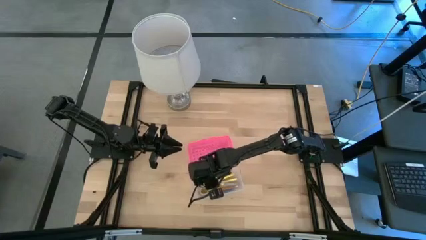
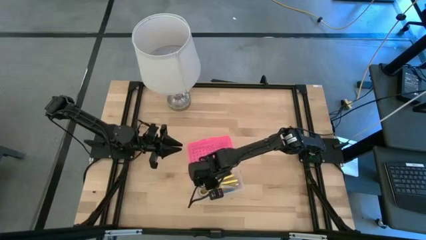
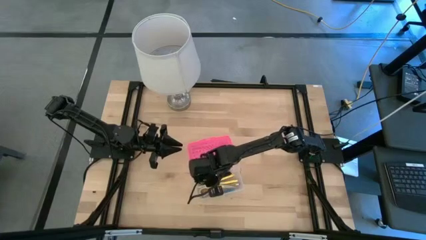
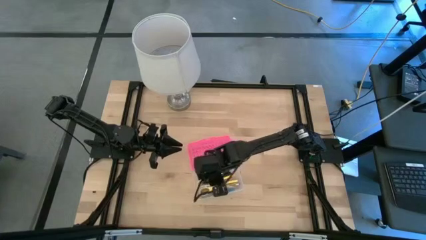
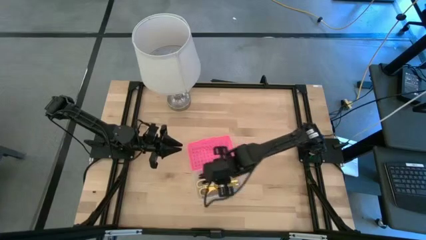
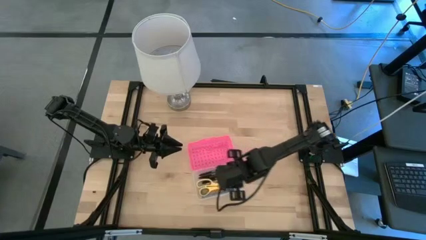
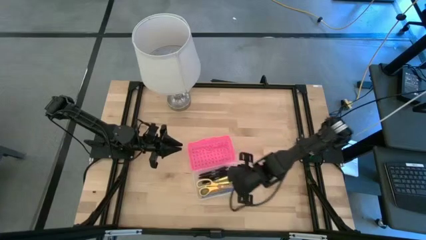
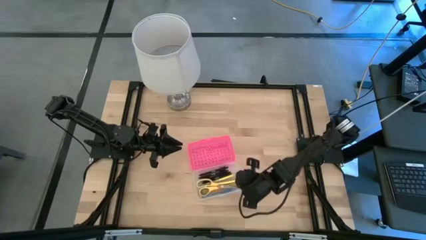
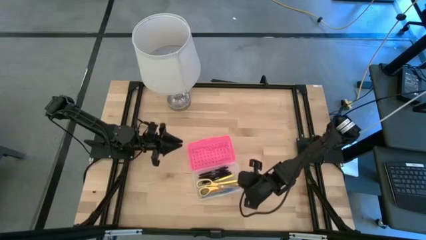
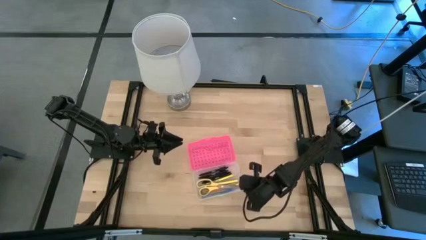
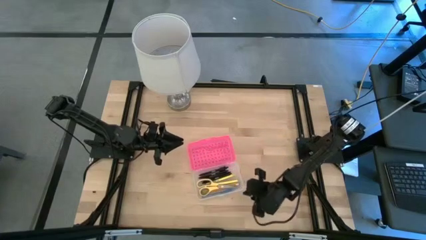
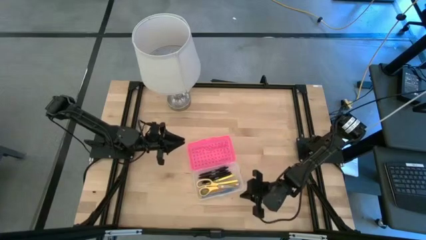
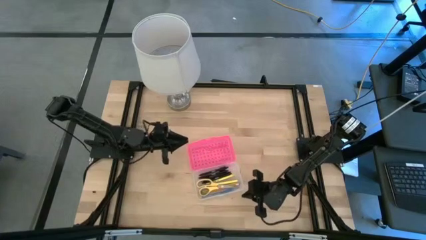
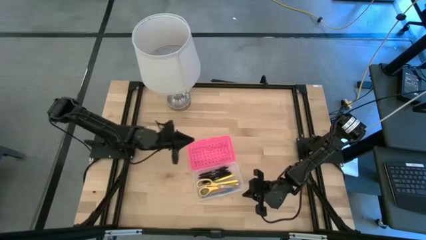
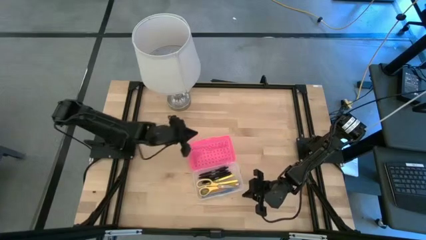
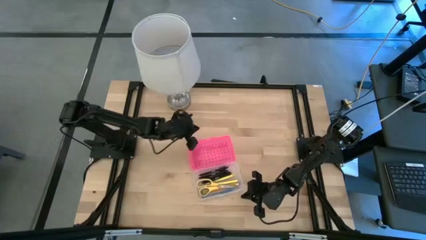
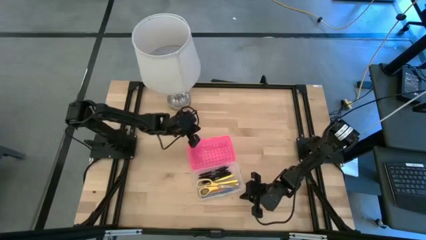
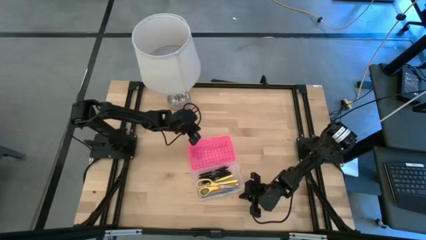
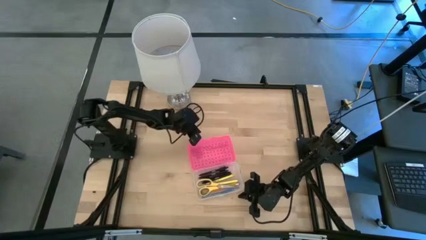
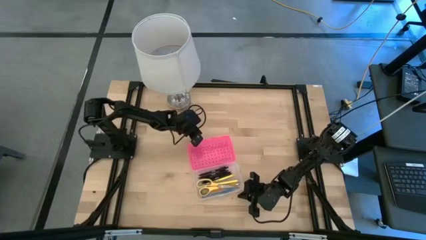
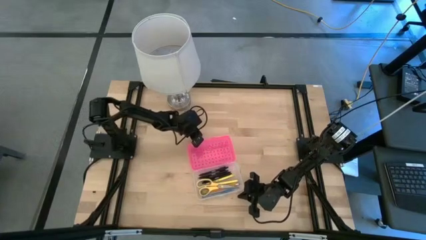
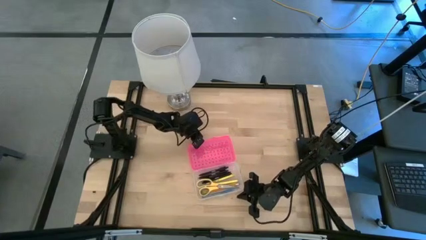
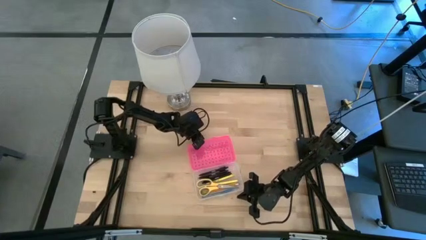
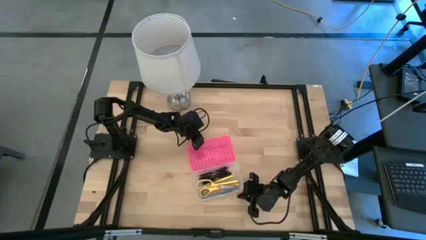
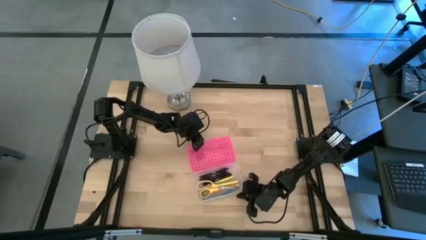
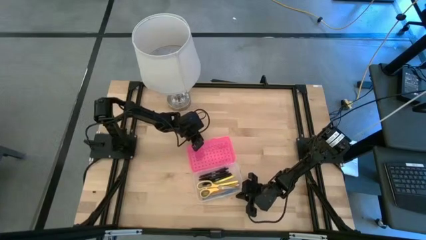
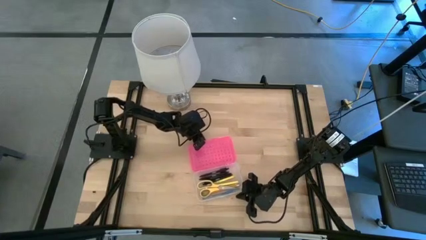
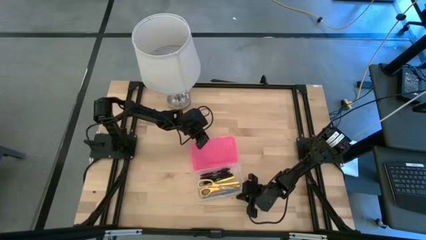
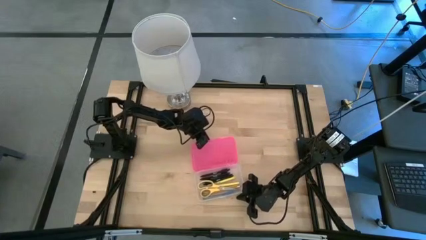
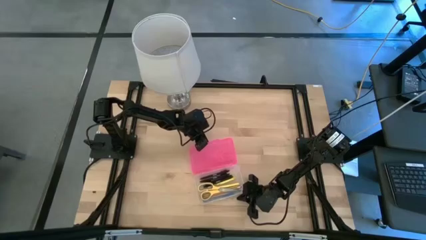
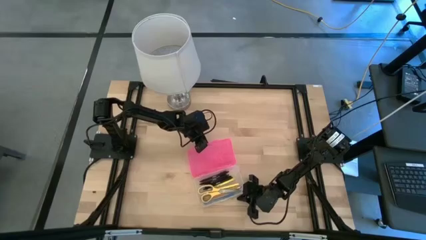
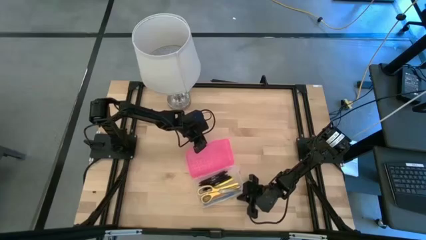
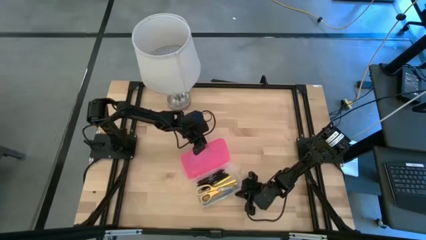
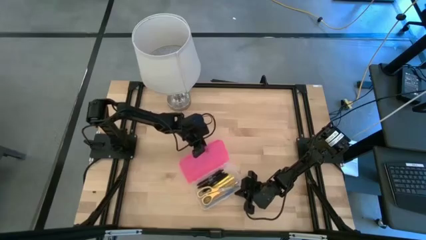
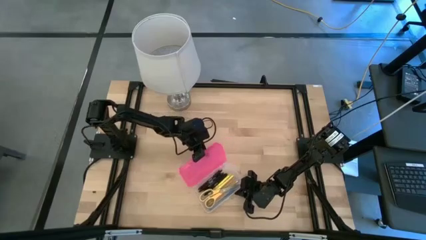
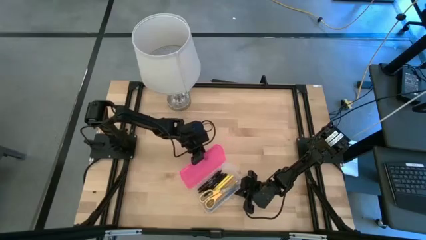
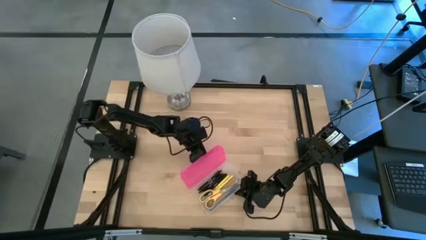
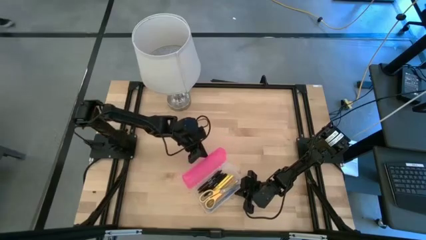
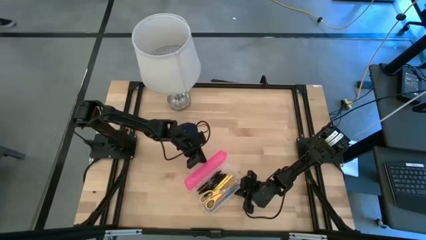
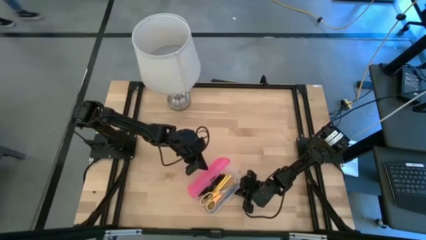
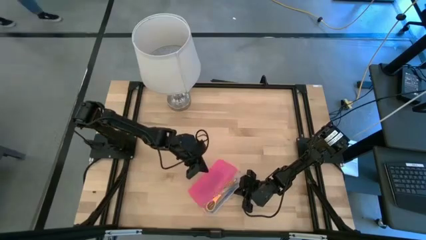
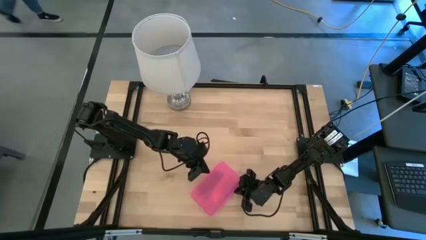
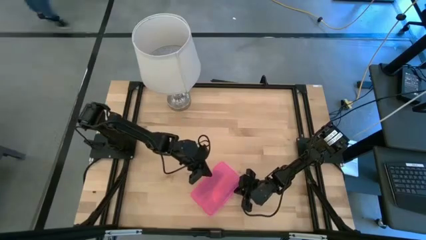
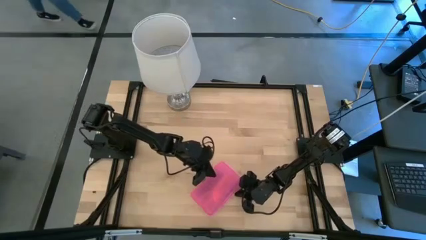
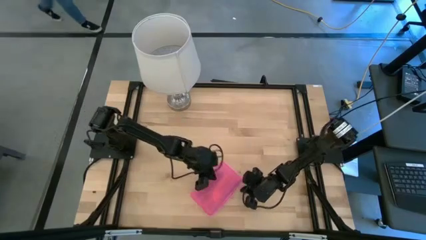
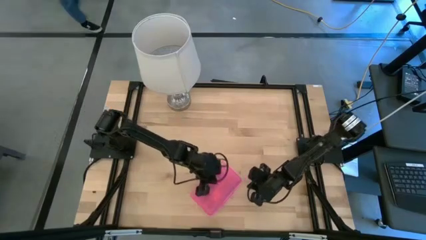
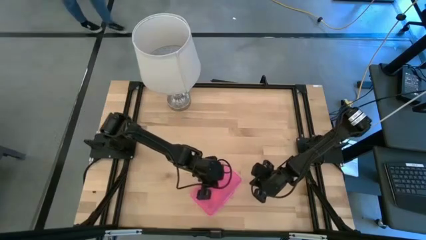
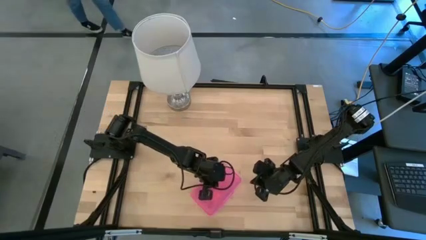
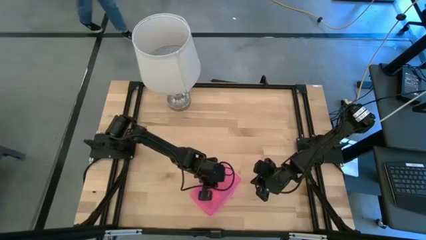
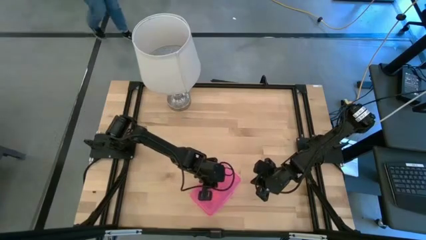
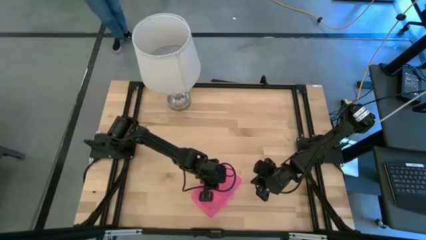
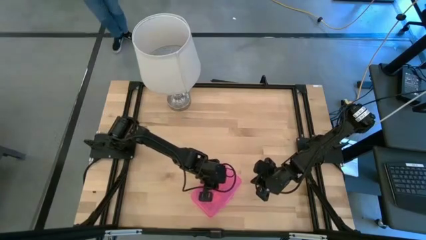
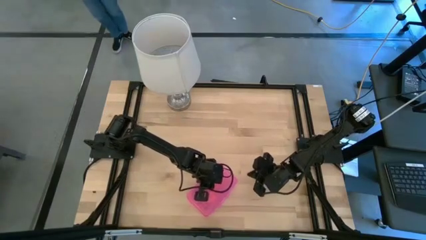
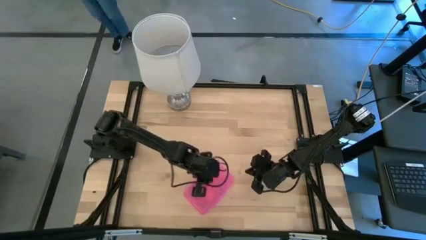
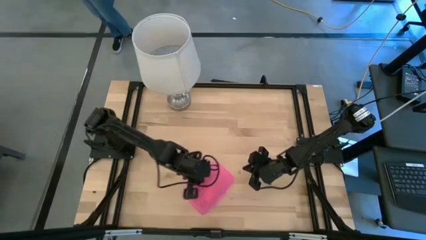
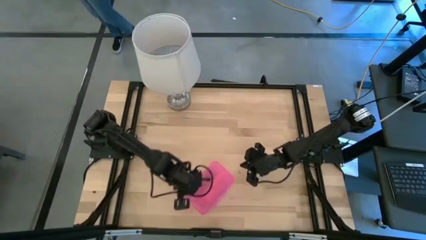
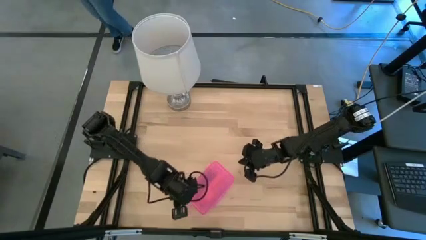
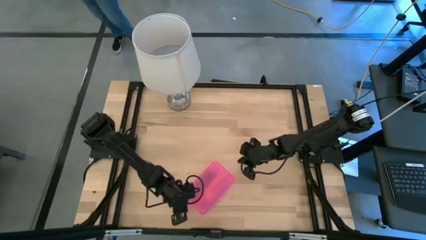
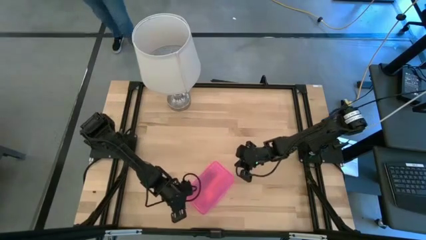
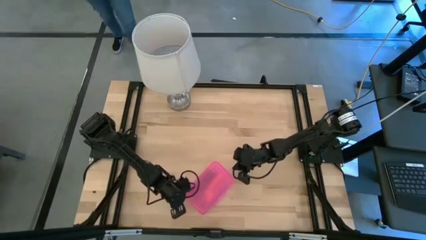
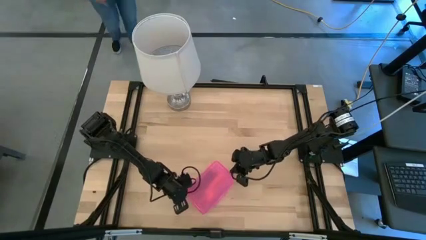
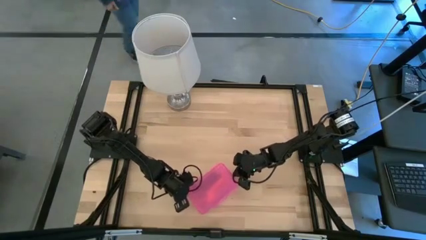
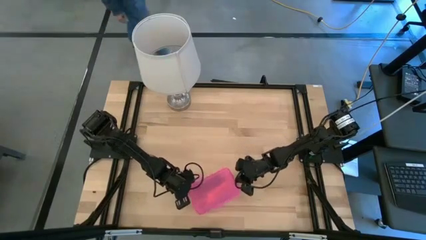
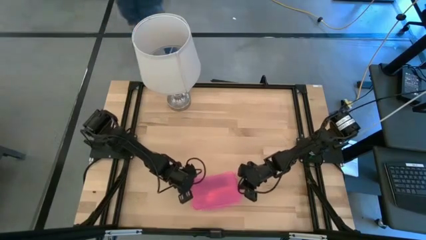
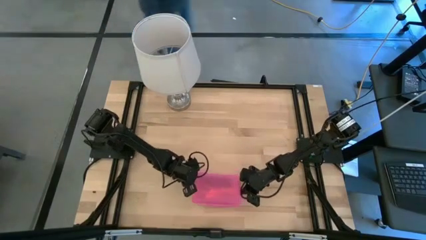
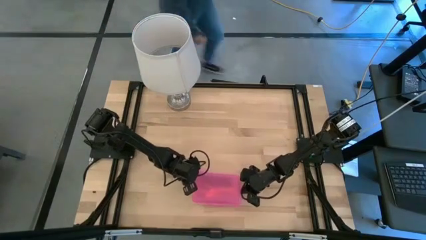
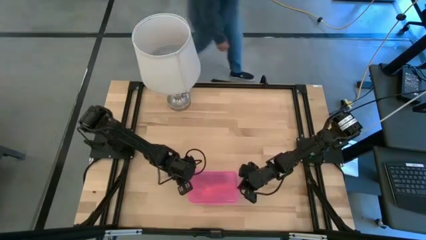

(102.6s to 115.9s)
Task: Pick & place school supplies into a supply box
Close the transparent supply box

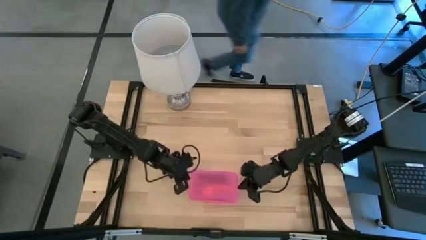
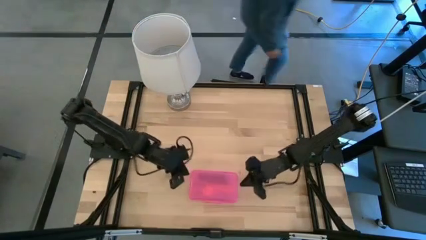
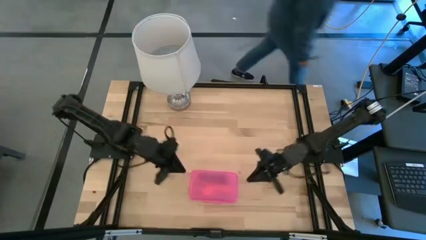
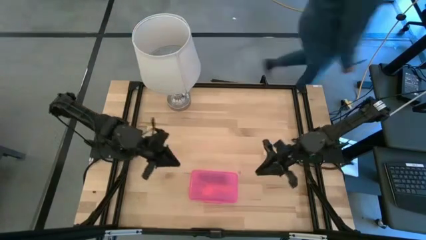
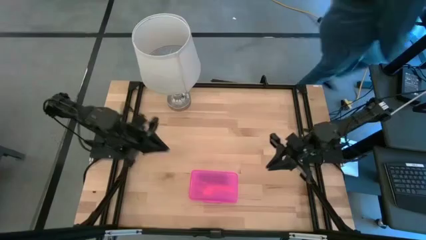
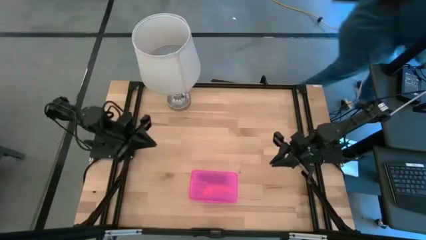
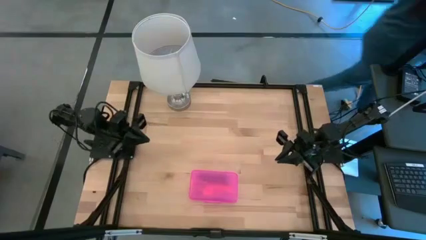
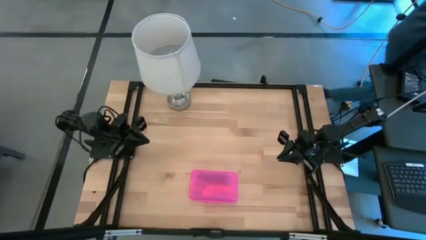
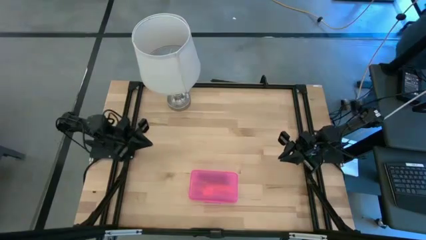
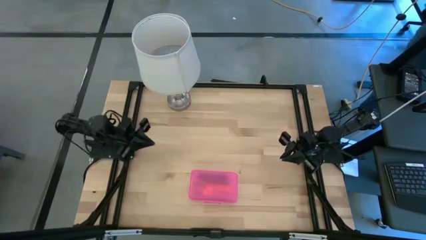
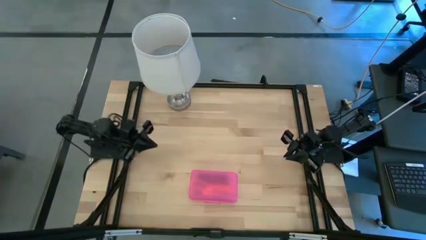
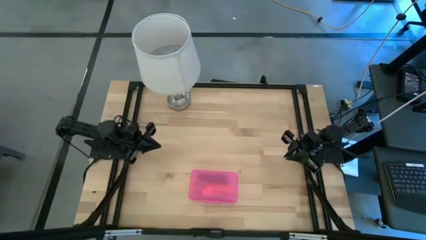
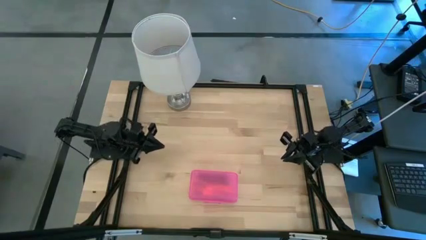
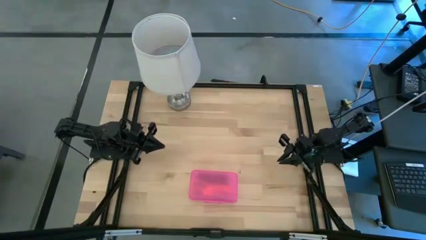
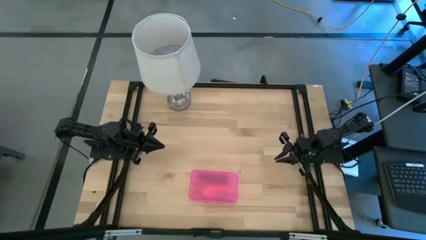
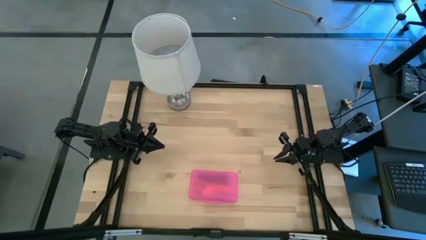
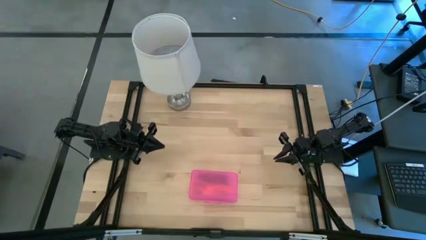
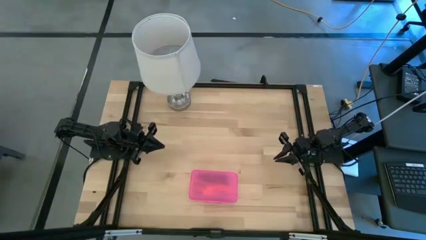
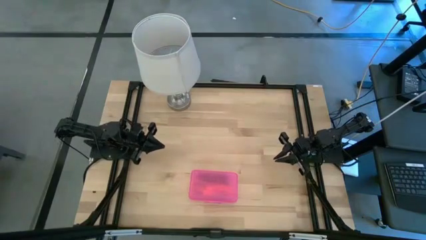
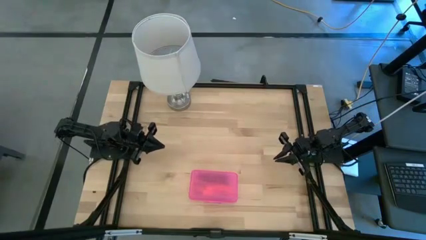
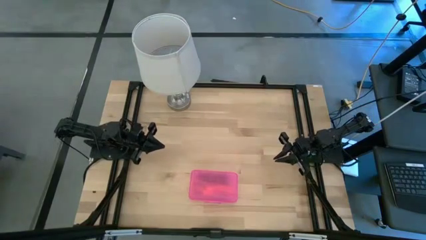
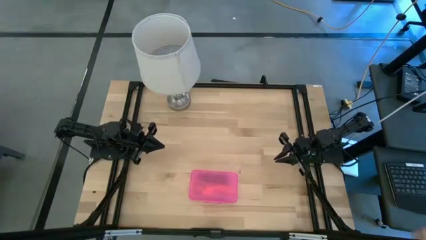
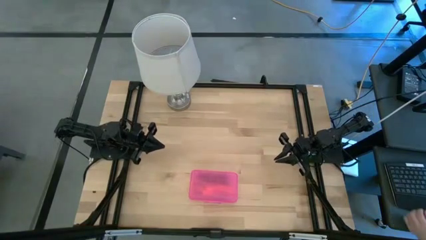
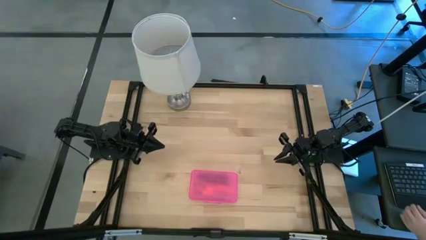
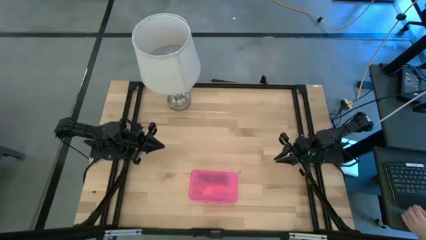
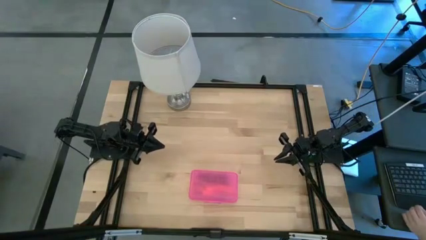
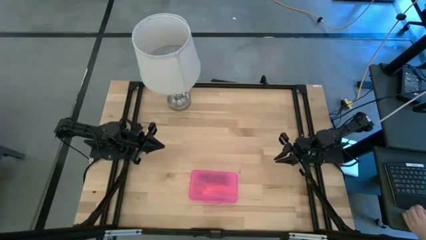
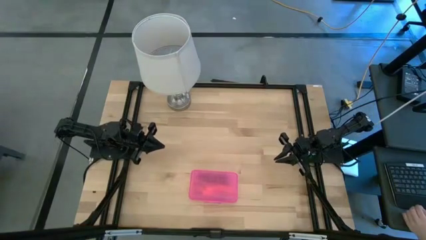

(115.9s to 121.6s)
Return to Home Position
